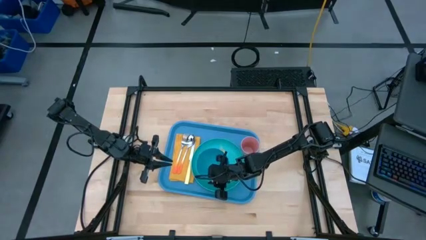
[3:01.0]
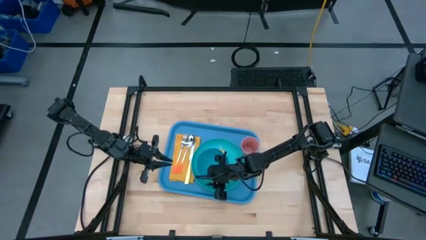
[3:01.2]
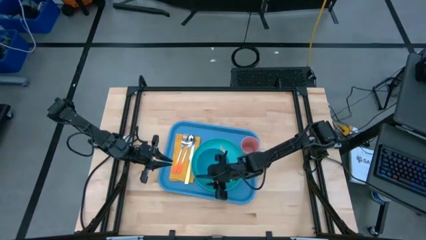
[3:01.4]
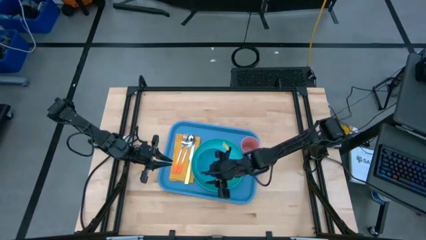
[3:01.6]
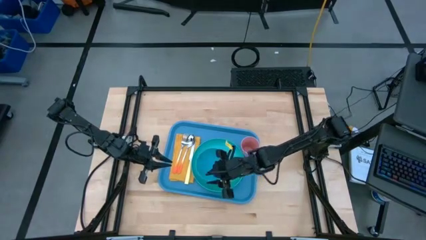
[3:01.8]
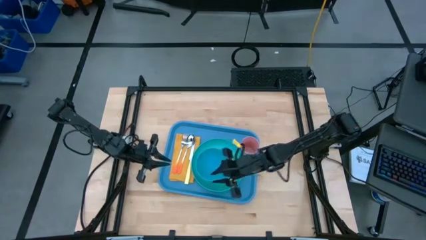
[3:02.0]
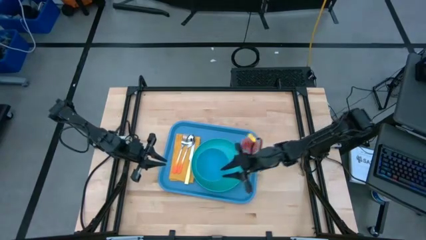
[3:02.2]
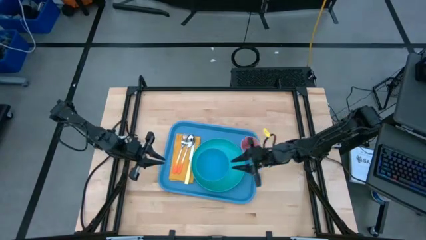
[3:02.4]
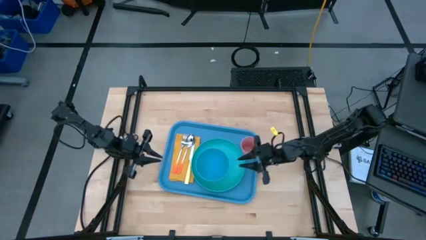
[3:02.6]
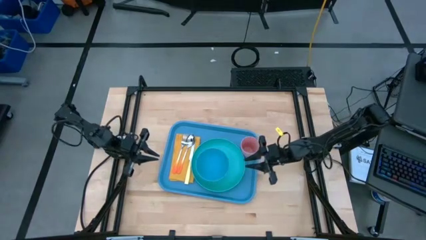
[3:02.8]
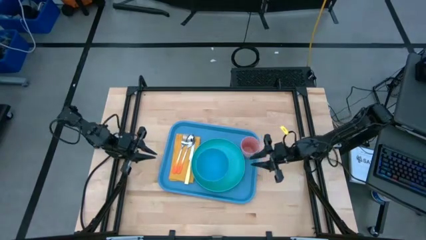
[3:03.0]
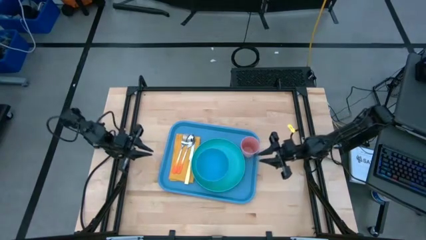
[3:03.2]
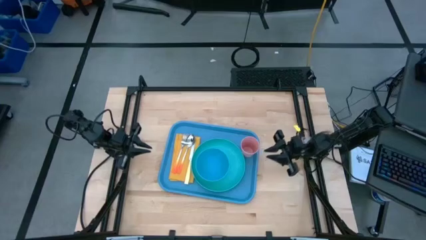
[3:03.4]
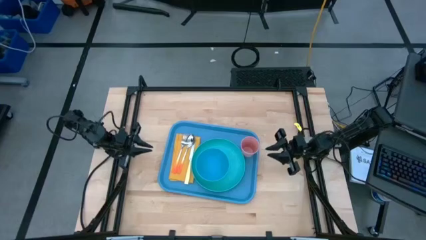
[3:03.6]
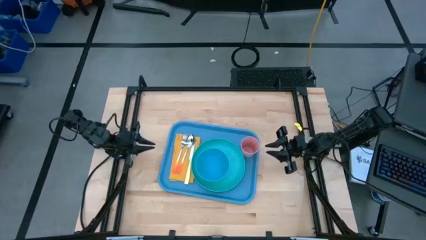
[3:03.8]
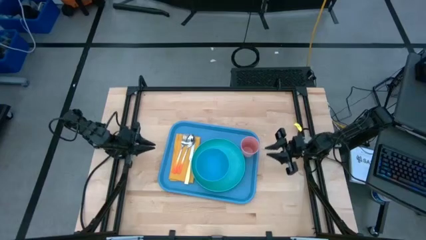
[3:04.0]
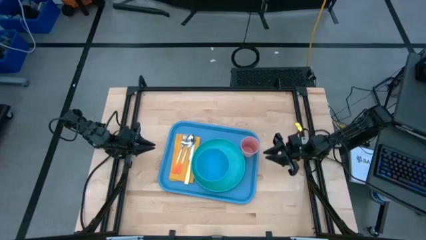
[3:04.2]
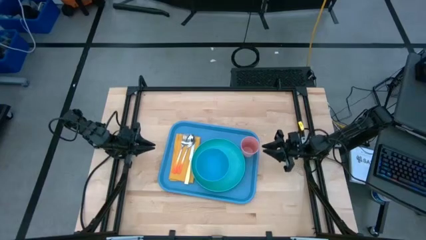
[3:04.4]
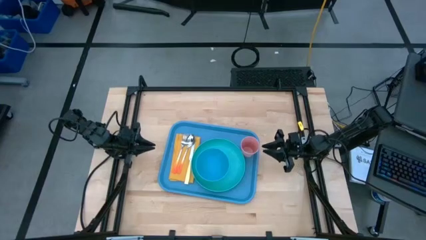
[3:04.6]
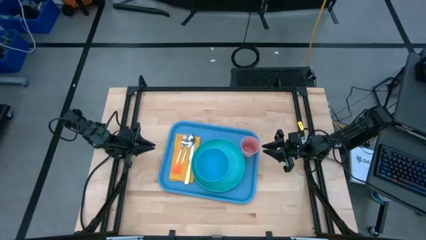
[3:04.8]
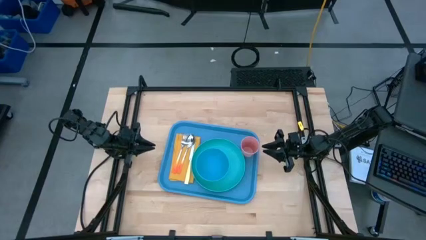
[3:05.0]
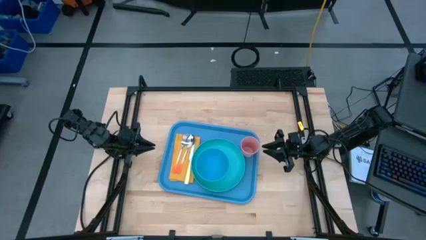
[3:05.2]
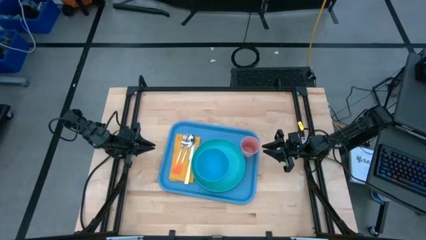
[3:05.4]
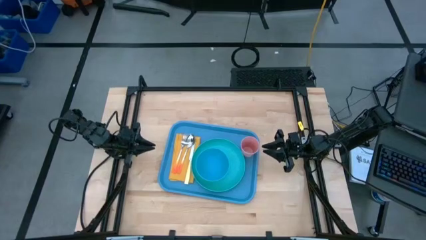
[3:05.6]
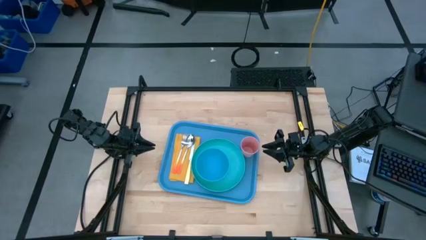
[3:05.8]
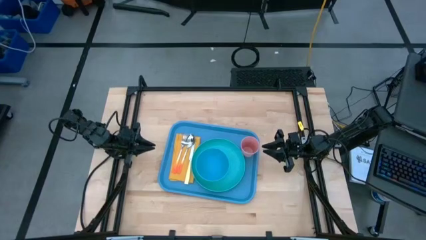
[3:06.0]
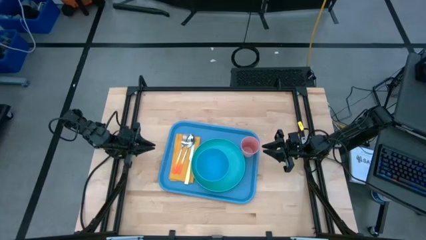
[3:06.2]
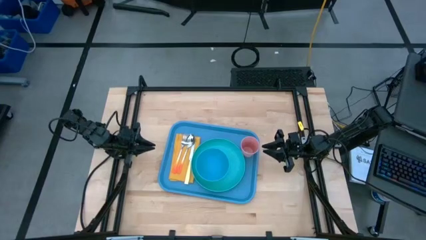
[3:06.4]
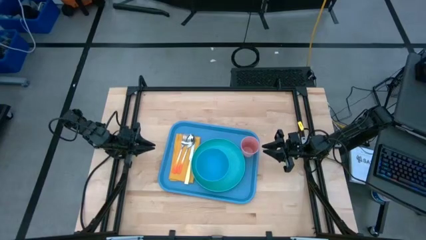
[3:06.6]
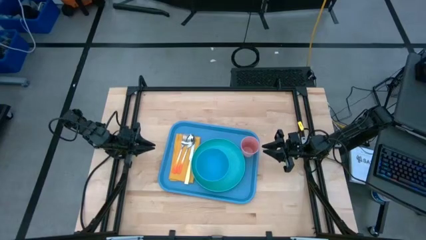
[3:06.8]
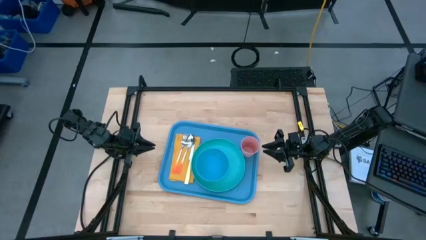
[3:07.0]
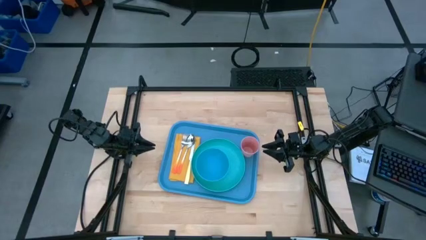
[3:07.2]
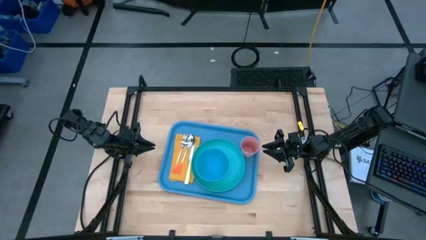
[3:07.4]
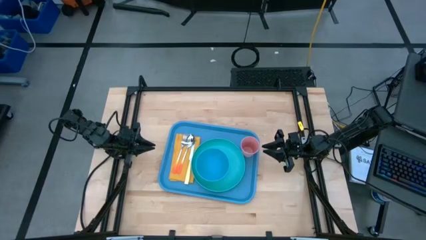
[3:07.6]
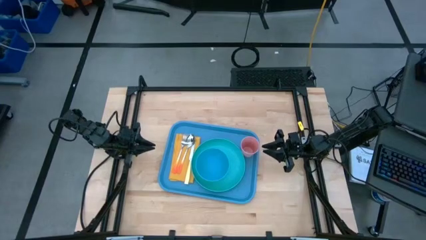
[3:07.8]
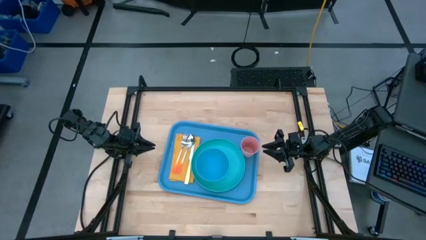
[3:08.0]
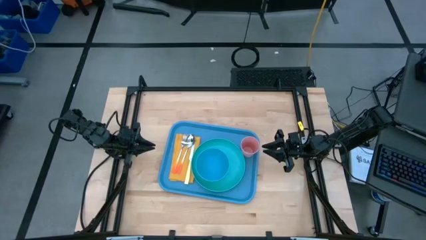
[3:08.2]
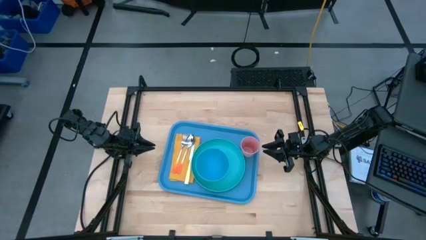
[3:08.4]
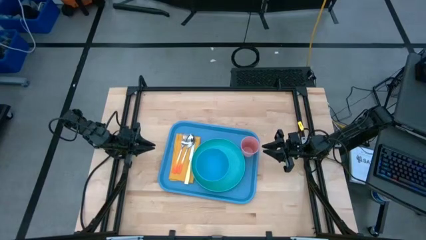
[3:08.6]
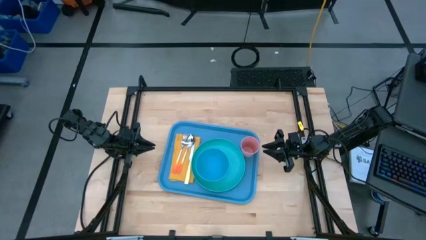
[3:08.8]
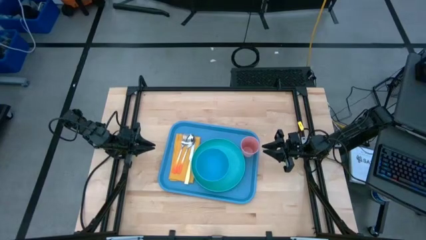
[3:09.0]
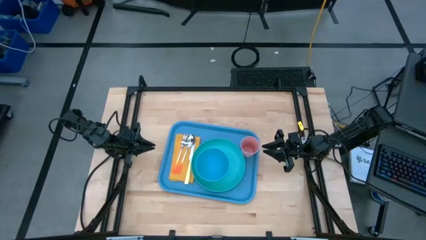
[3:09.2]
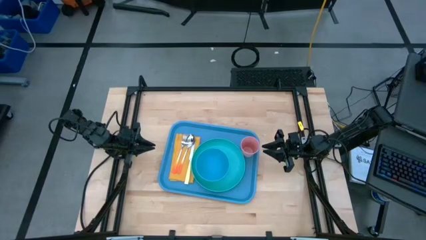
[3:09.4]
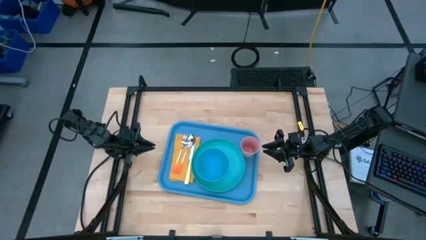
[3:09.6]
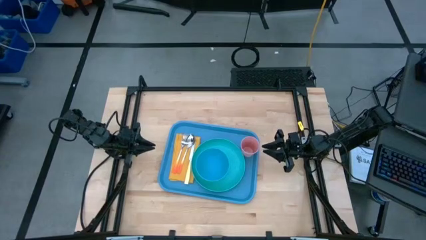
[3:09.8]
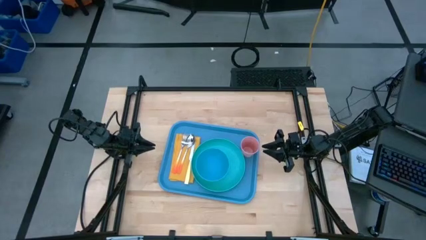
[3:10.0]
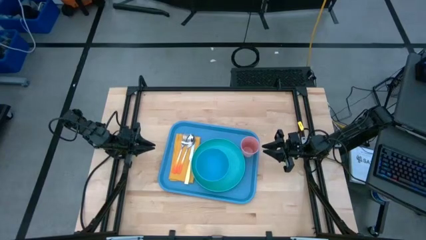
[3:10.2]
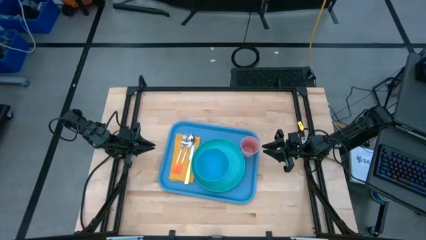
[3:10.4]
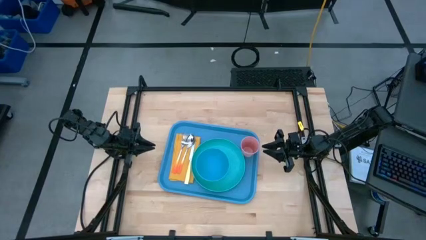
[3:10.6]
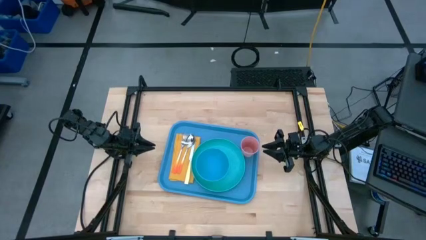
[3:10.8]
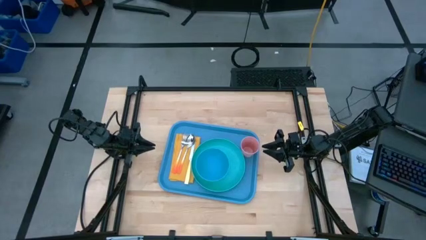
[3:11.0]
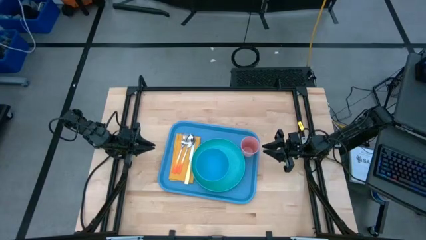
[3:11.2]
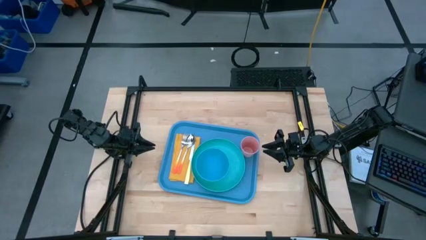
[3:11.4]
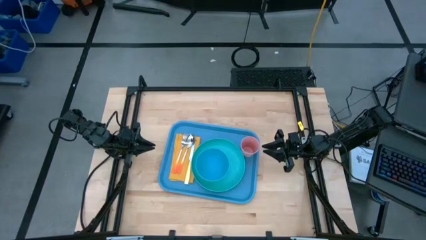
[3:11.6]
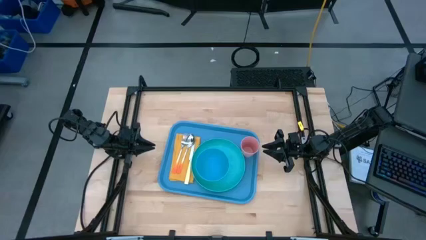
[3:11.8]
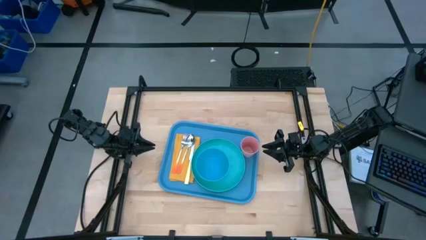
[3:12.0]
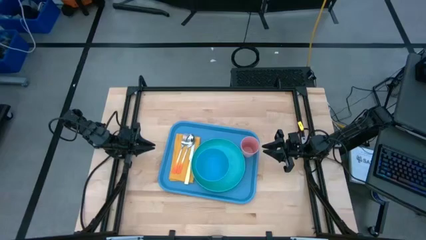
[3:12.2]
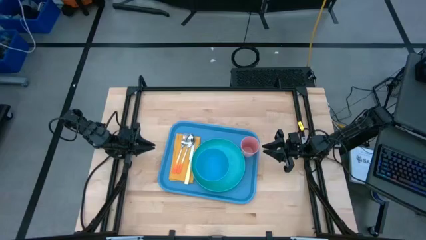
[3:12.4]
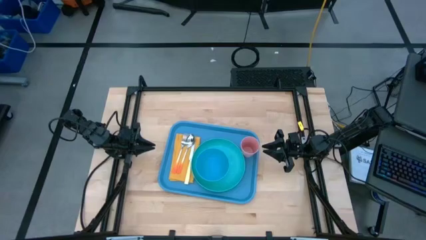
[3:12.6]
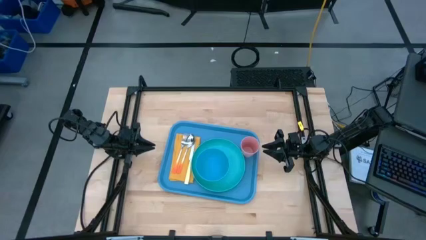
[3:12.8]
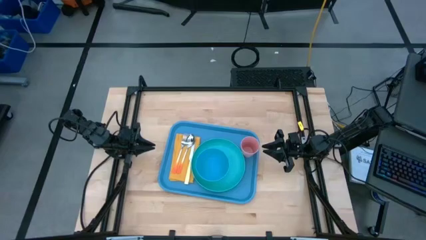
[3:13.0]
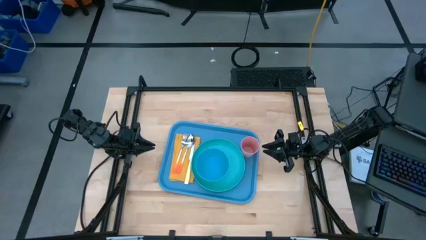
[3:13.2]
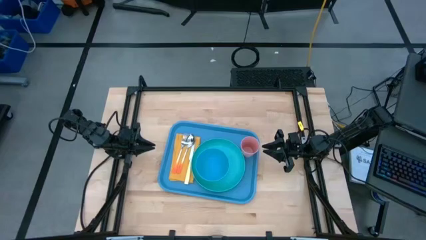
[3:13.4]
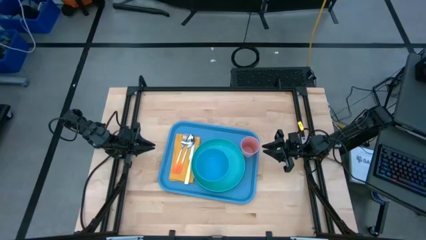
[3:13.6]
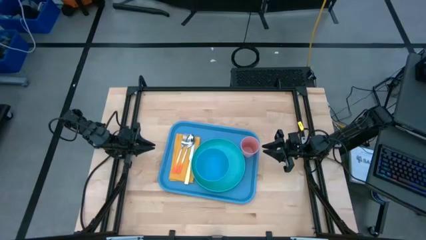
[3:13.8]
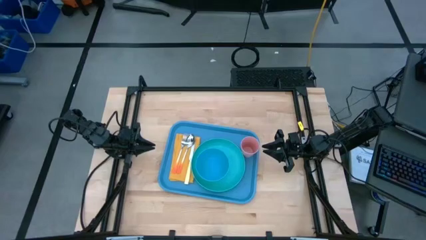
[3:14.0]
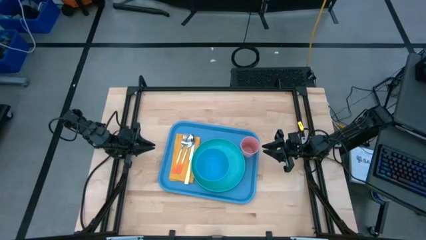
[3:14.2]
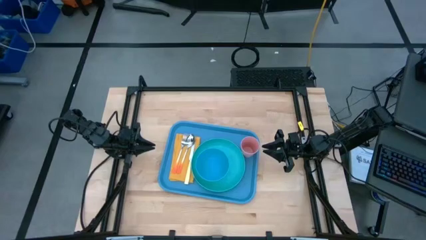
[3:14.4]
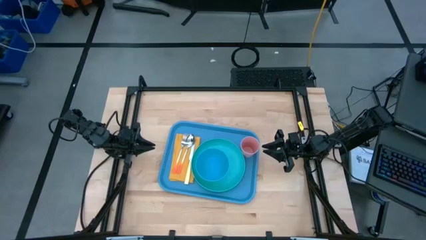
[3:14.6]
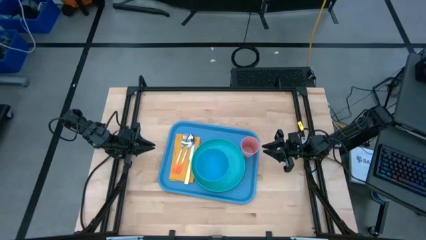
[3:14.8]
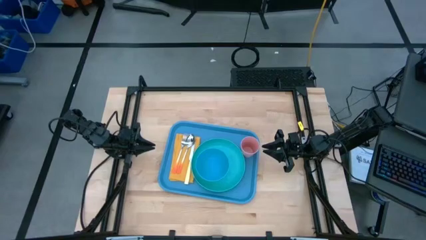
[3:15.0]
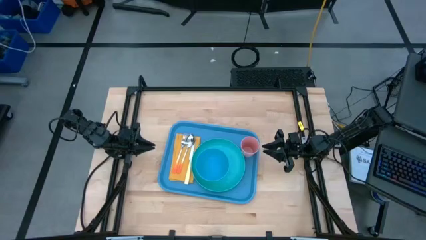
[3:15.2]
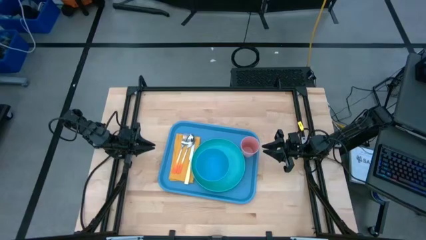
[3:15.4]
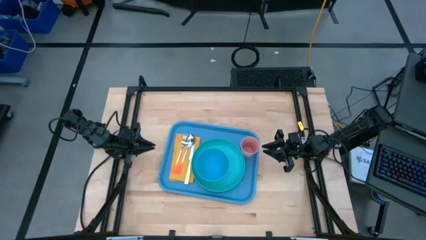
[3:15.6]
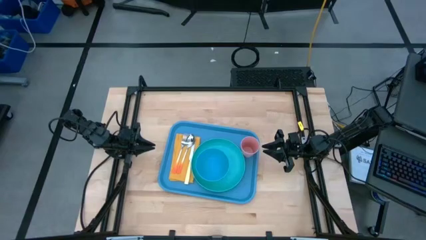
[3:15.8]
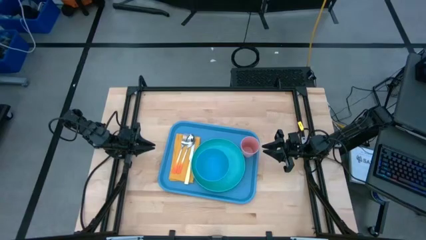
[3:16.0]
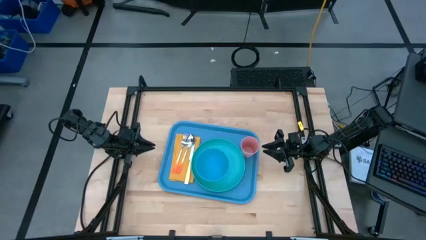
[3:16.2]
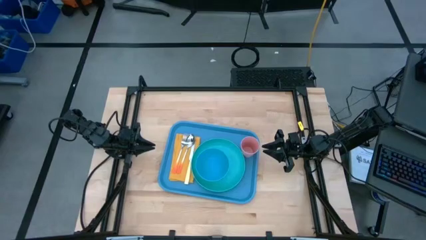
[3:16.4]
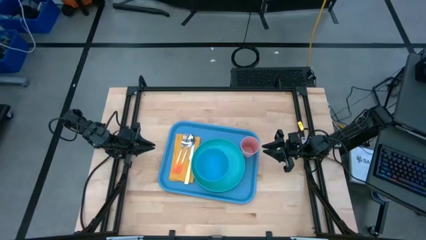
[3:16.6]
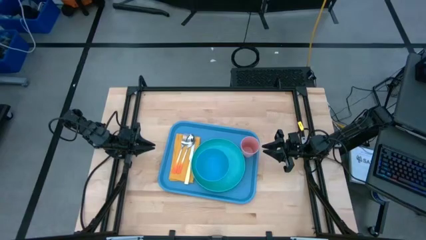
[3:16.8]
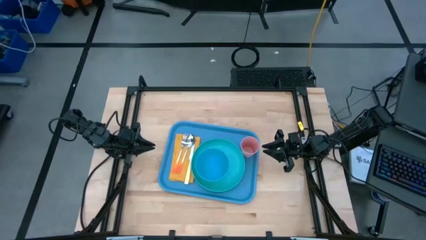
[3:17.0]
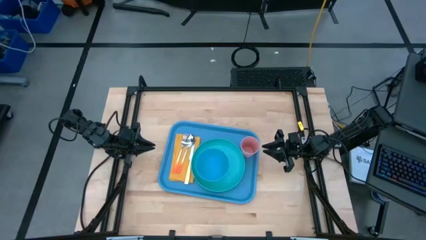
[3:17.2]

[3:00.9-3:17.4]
Task: Set up tray
Return to Home Position

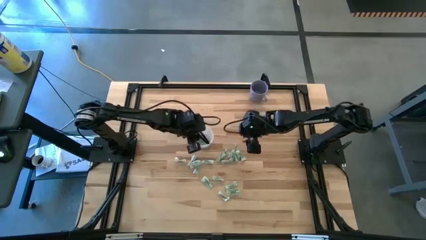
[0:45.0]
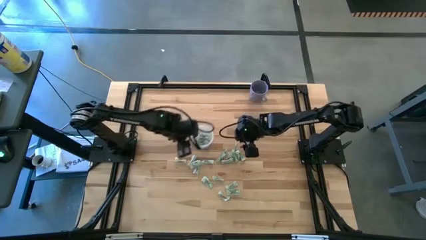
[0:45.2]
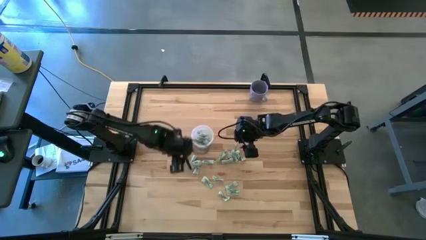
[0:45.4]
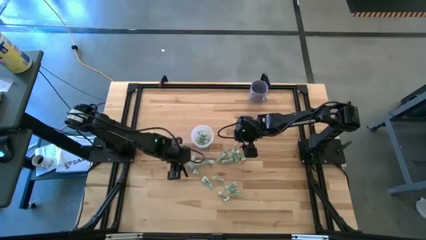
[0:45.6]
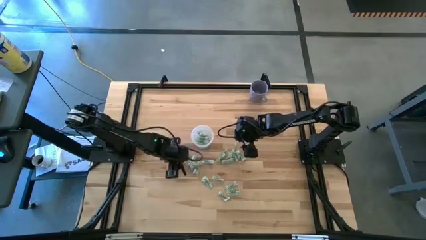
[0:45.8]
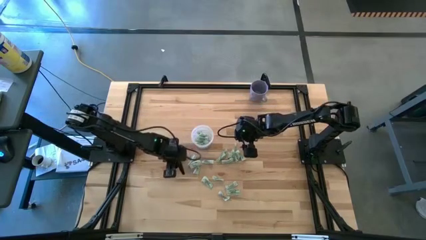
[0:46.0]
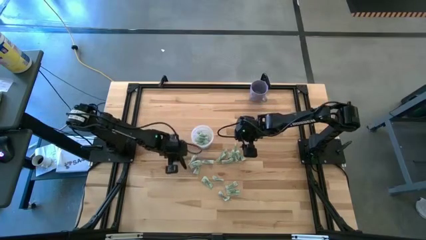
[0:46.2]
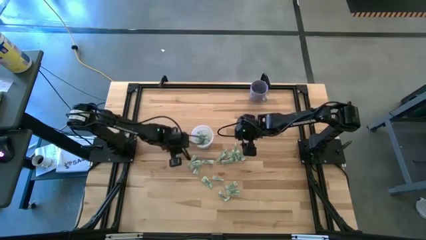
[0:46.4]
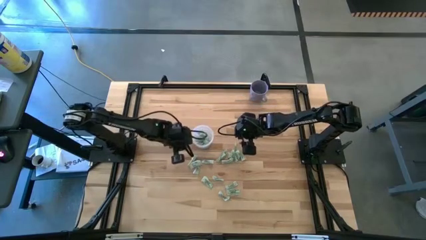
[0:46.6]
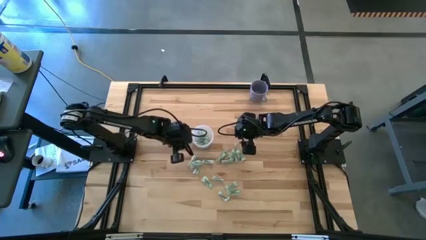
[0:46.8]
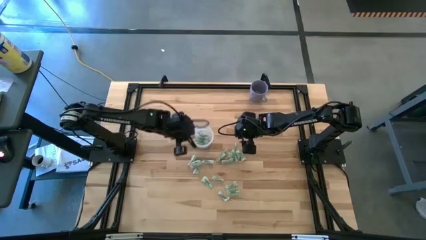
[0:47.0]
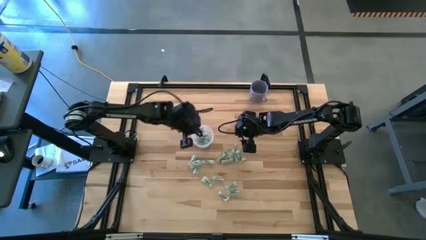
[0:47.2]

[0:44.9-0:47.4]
Task: Pick and place Stevia / Truvia into bins
Put the white stevia packet into the transparent container
